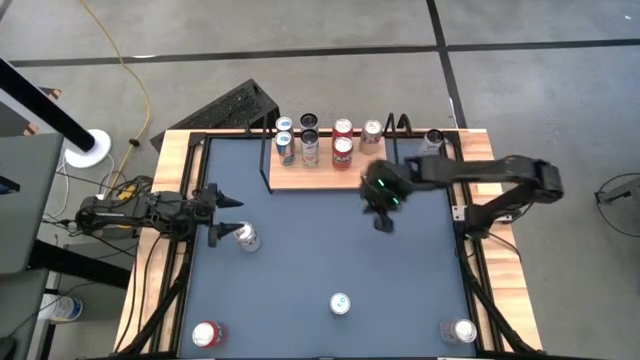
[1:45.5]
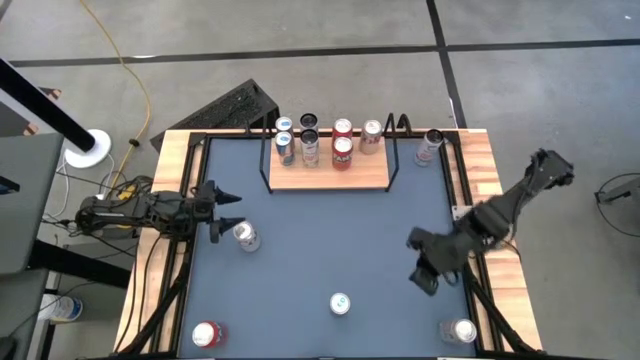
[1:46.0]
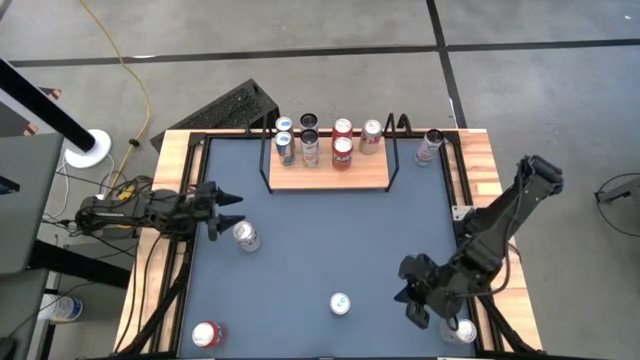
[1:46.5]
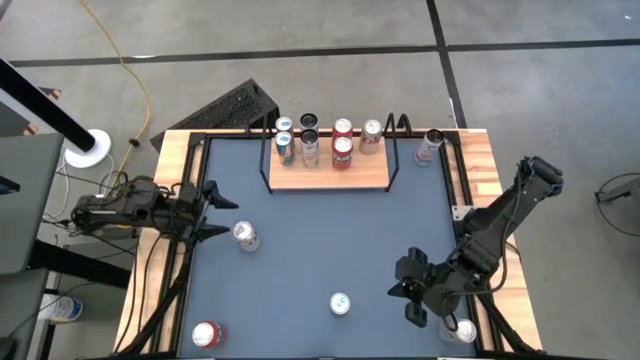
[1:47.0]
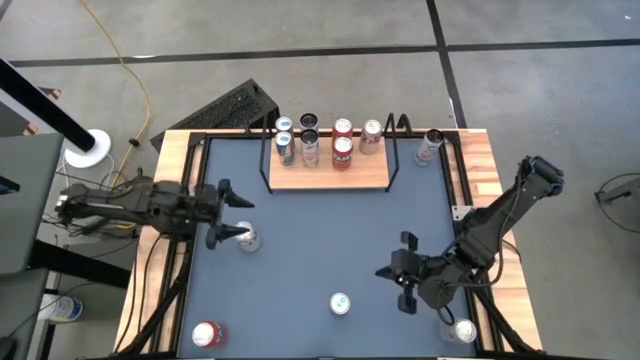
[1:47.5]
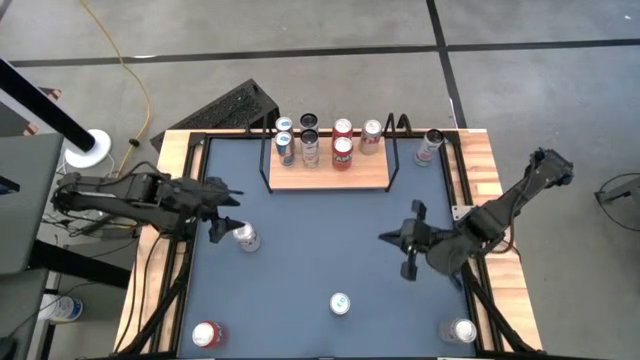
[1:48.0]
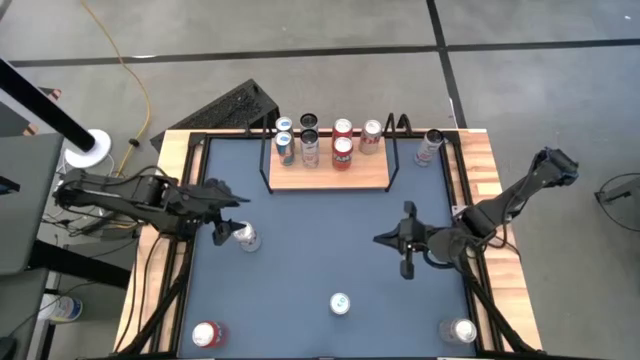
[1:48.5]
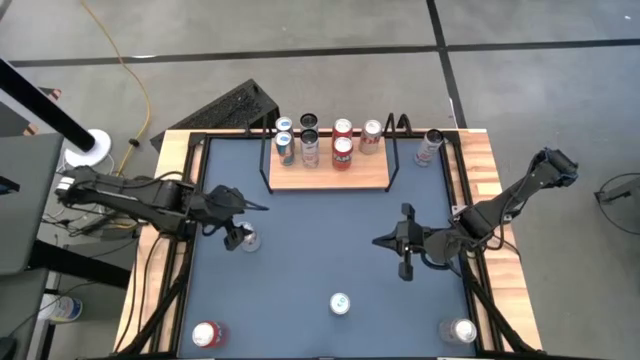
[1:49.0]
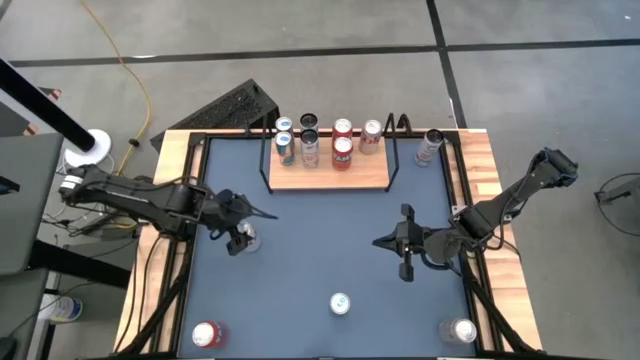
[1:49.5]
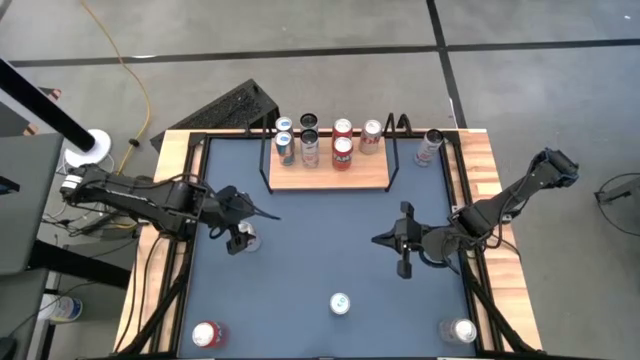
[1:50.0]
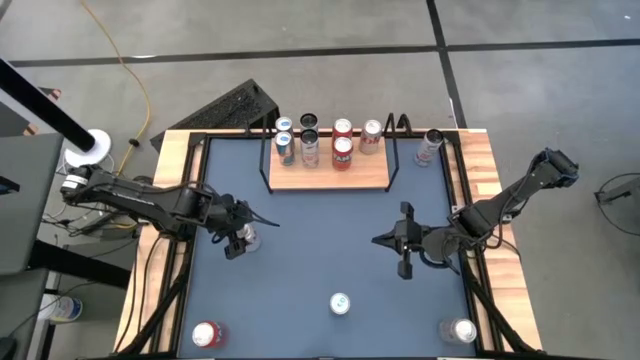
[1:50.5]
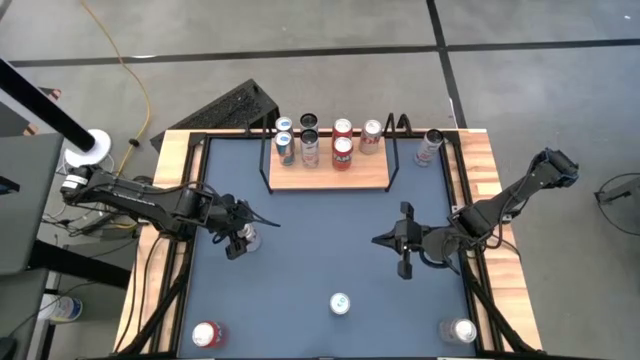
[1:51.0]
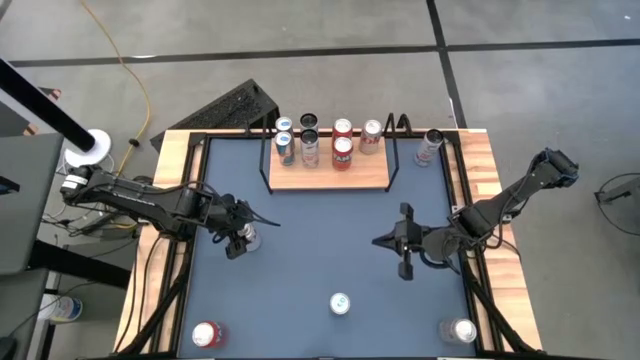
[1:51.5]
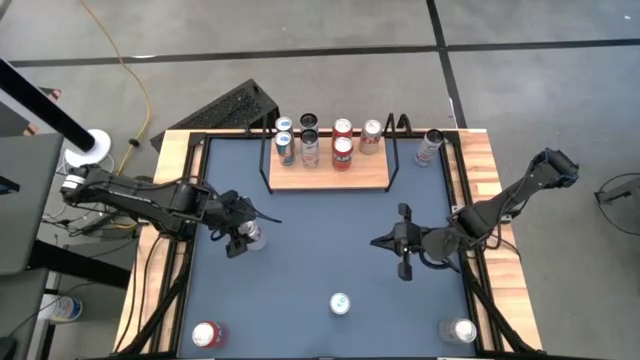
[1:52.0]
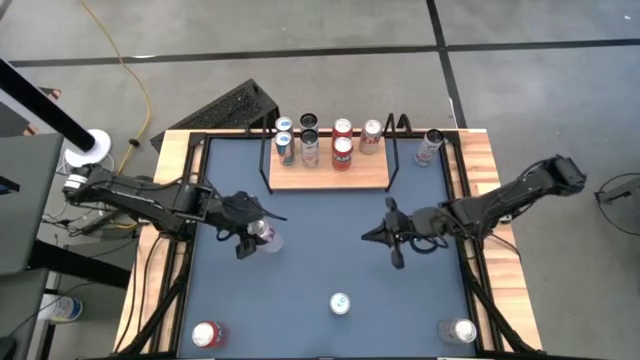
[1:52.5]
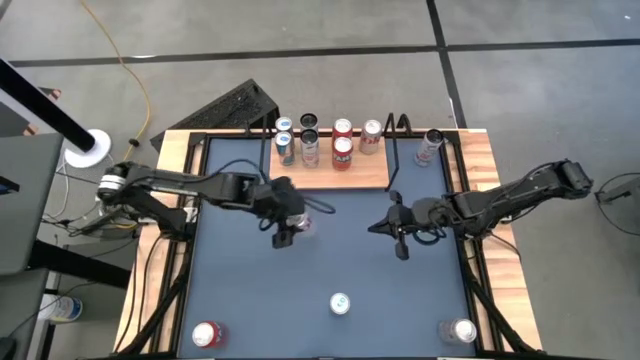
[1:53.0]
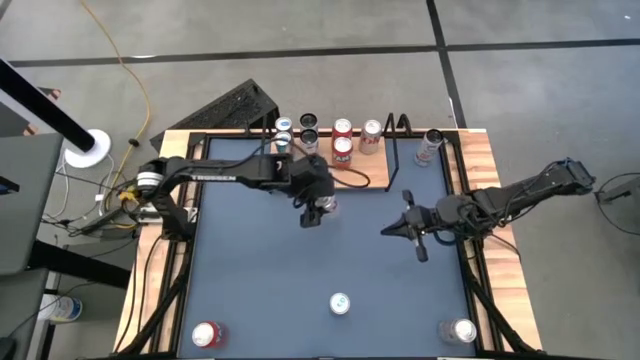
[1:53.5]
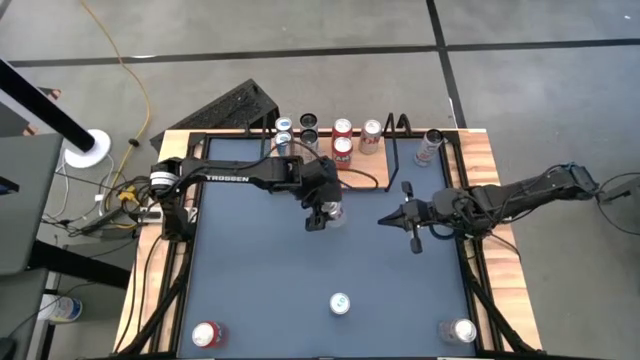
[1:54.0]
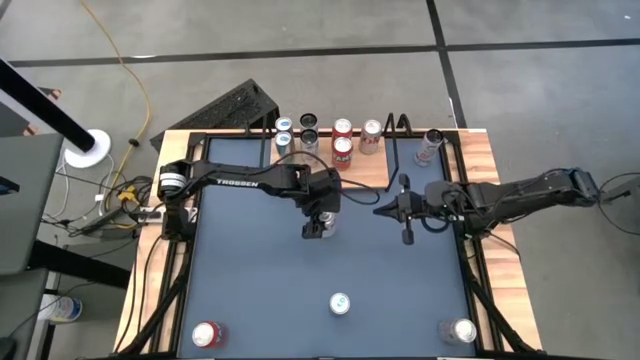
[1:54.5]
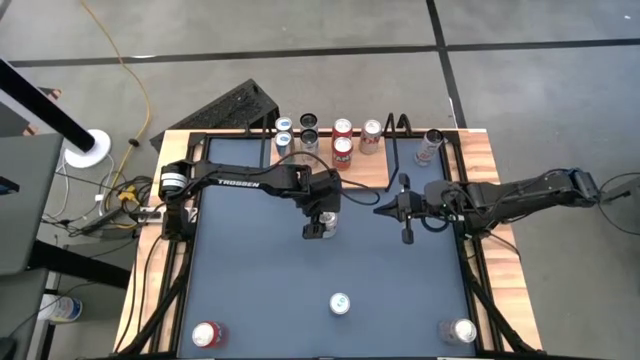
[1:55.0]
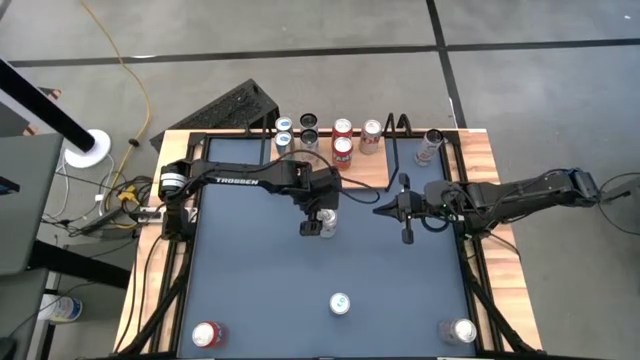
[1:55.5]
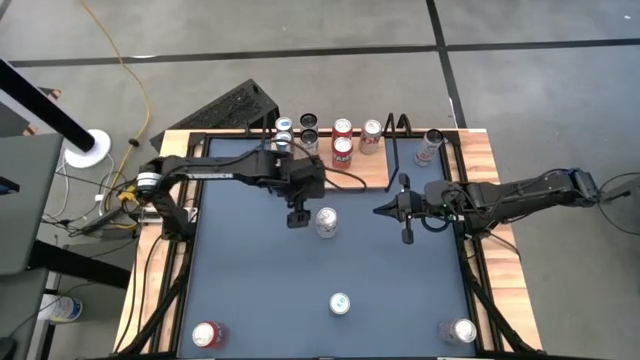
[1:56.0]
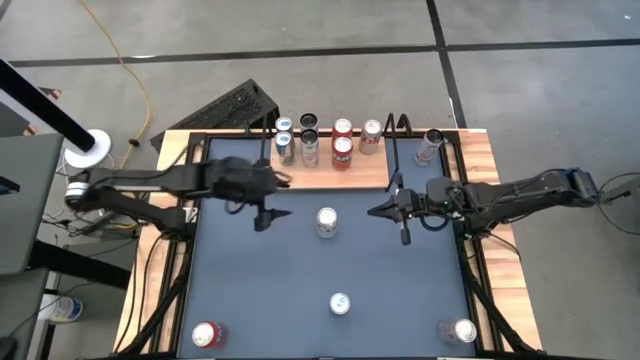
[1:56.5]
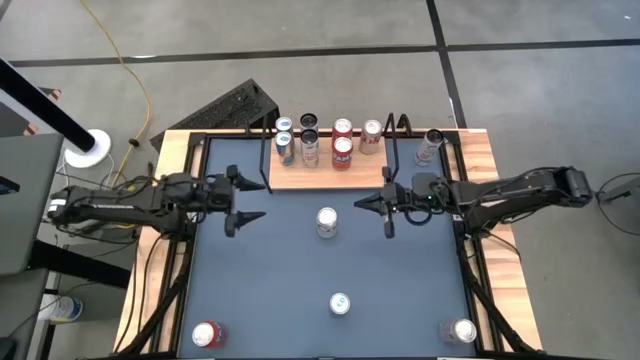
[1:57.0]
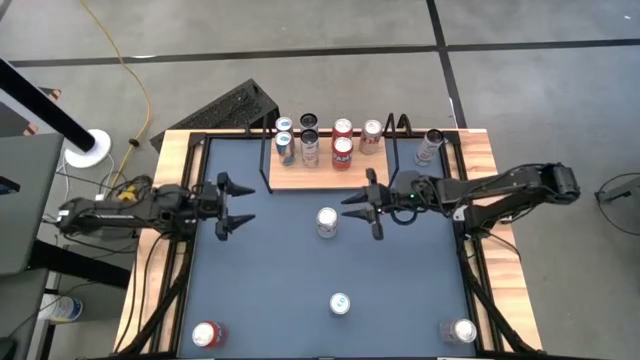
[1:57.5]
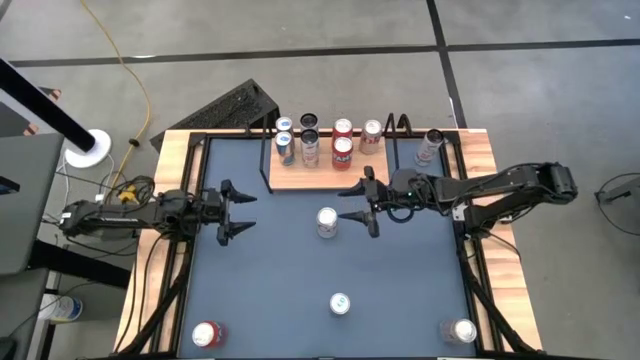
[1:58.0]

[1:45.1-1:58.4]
Task: Place canned beverage on shelf
Put the top red-silver soda can on the shelf aligned with the other red-silver soda can

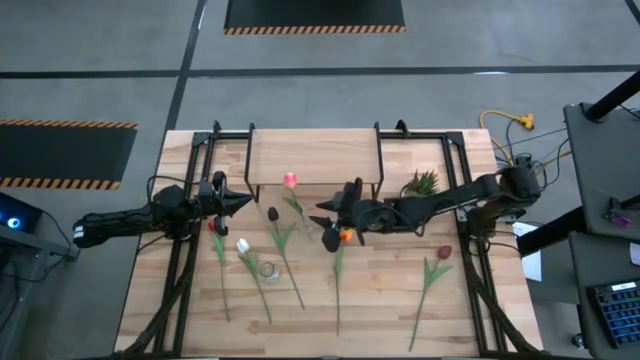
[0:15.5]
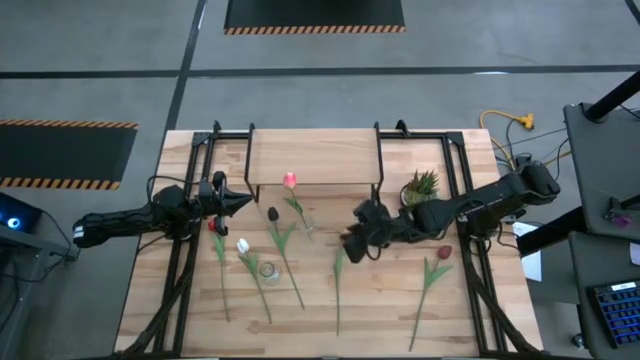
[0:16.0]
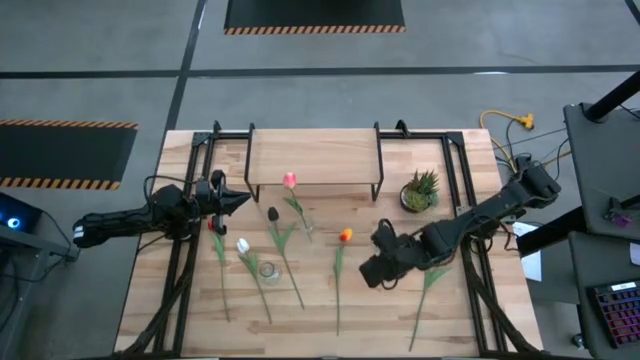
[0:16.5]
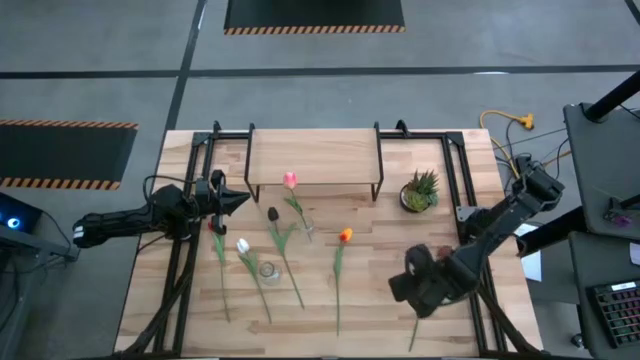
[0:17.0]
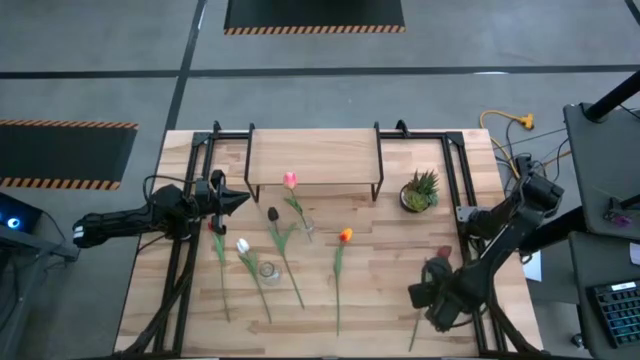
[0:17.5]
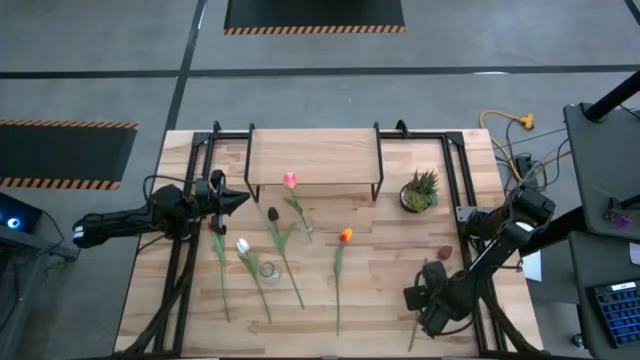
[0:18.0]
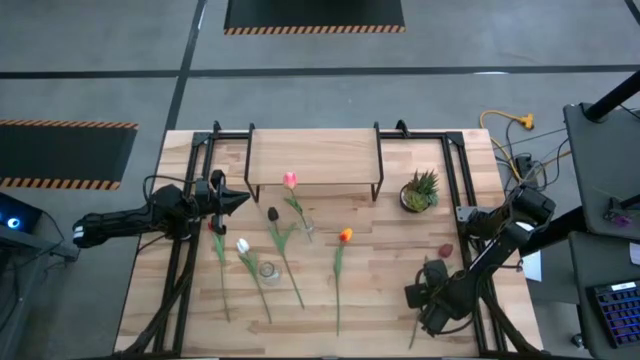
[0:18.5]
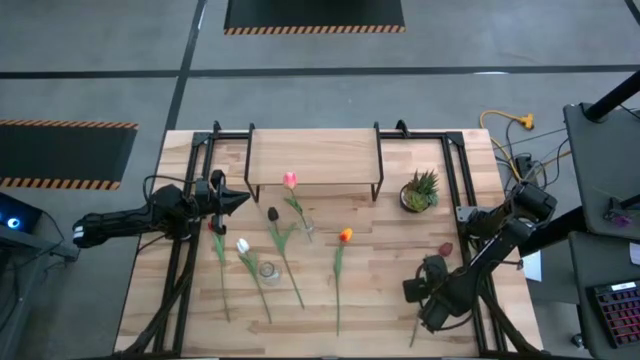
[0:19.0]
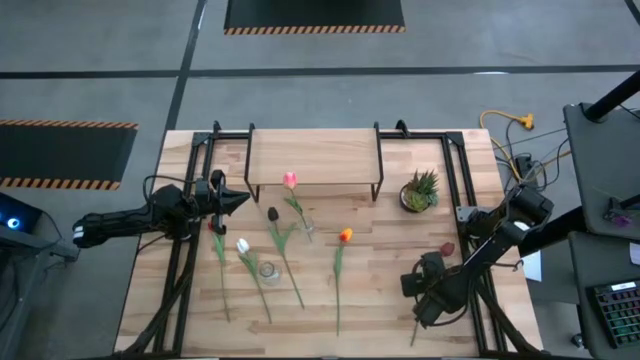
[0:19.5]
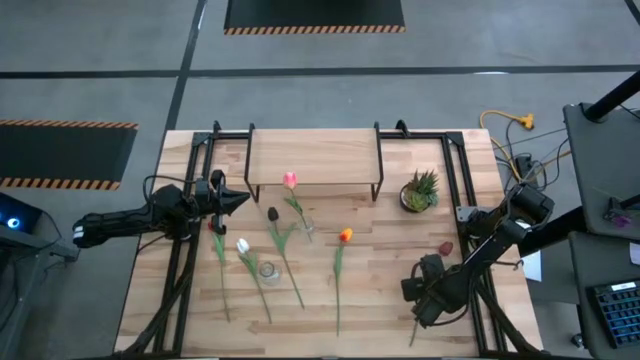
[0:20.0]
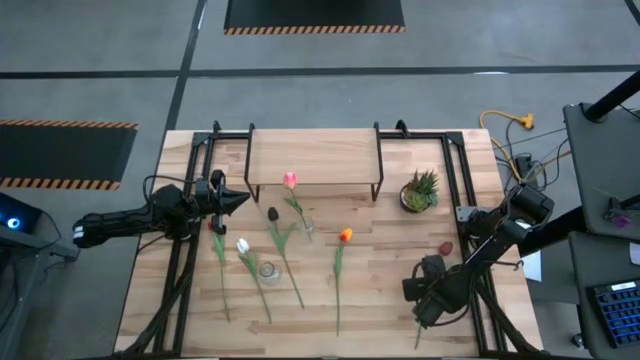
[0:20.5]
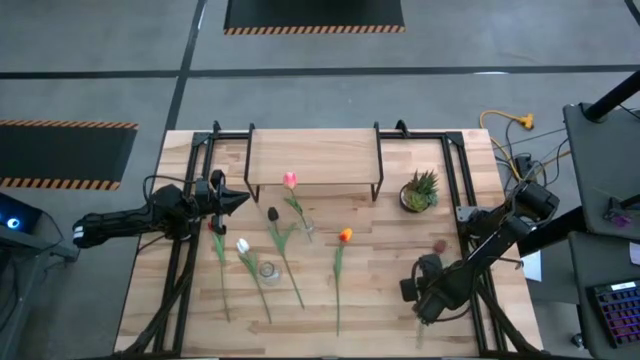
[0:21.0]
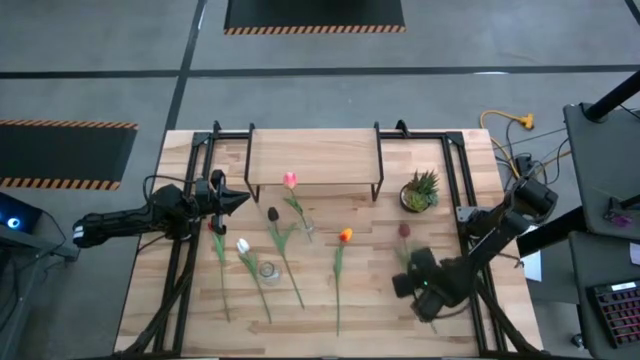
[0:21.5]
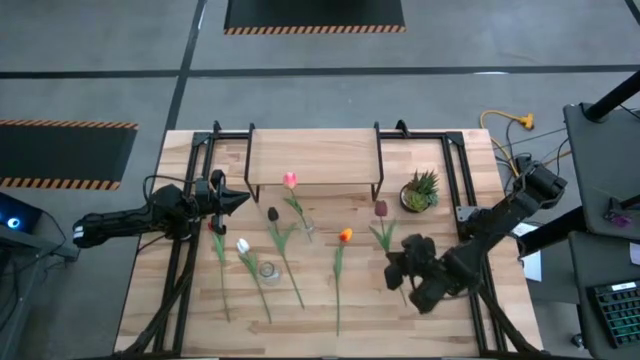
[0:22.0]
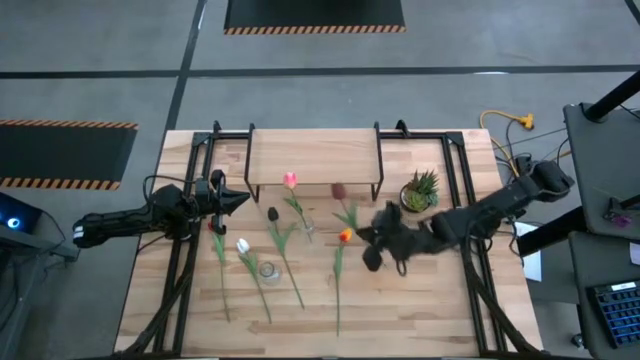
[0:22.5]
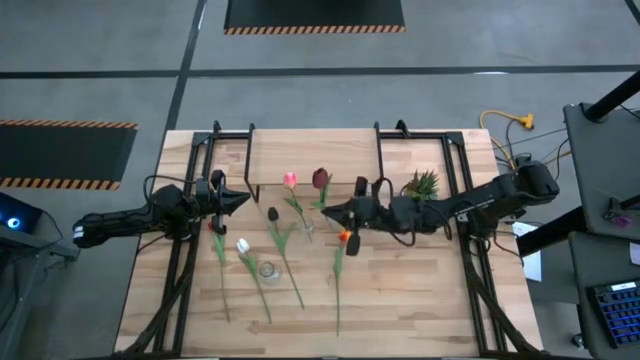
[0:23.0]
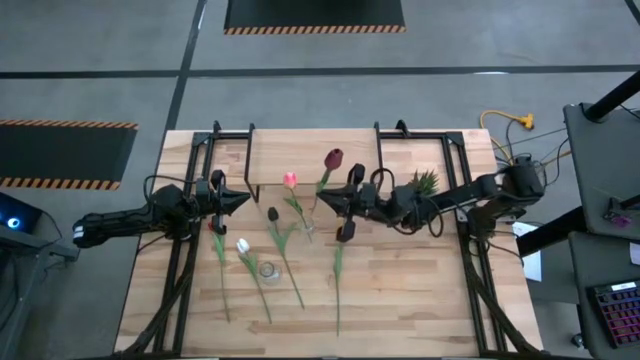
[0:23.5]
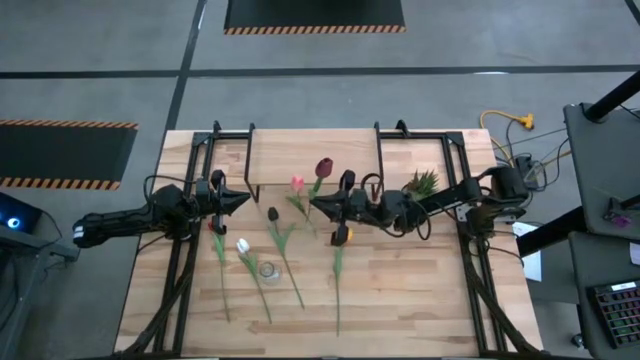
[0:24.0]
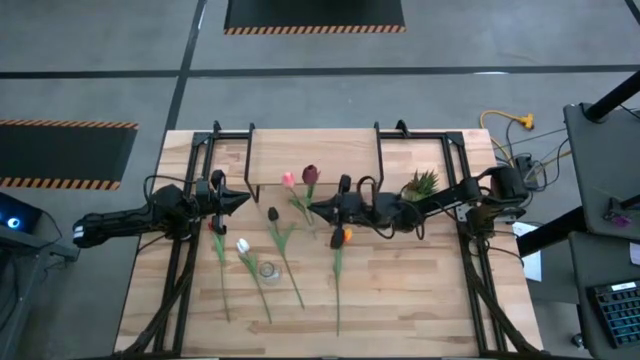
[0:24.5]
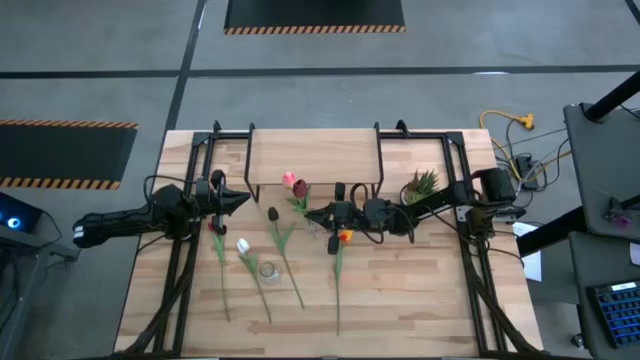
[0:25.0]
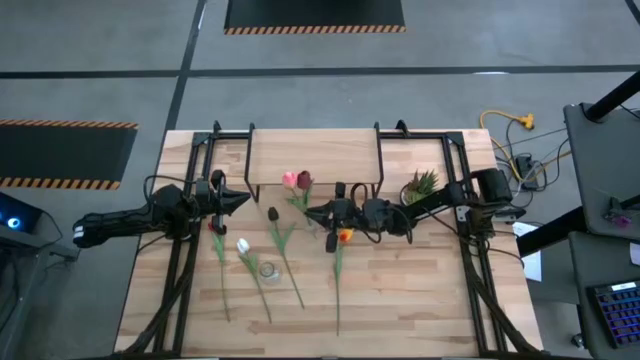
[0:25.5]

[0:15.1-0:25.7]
Task: Pick and place flowers into a vace then onto a shelf
Put the purple flower into the top transparent vase
